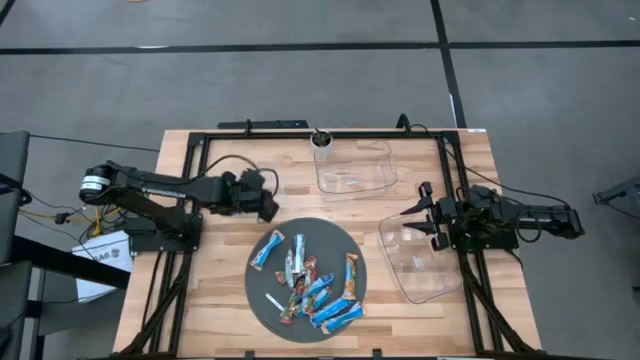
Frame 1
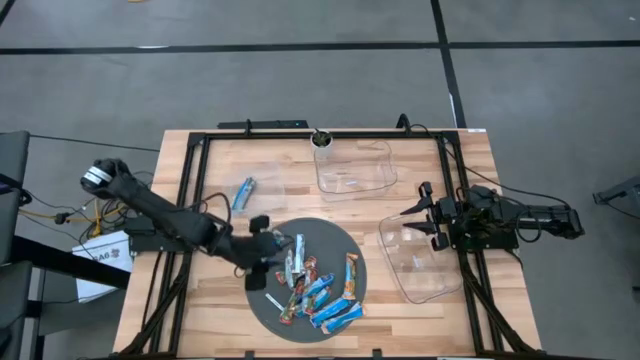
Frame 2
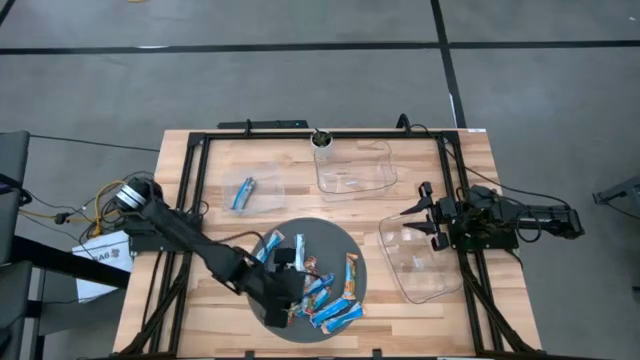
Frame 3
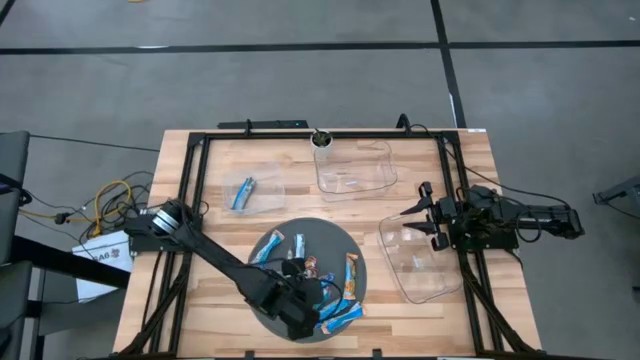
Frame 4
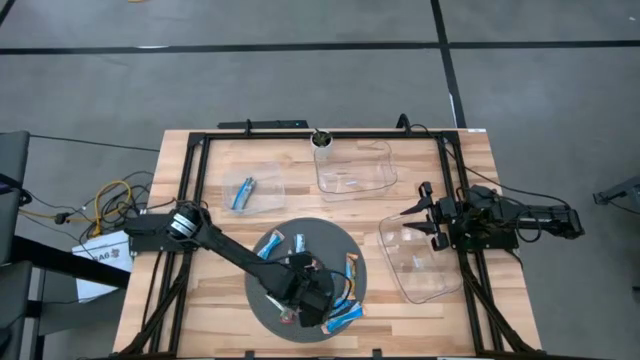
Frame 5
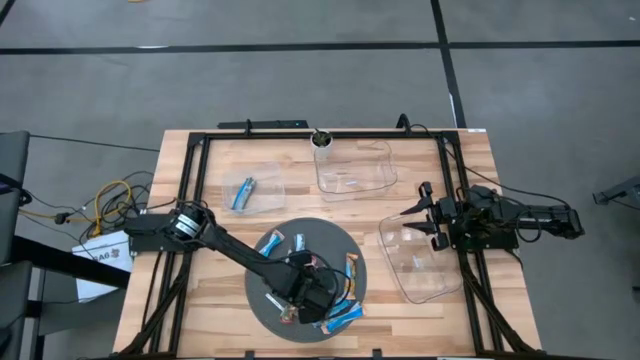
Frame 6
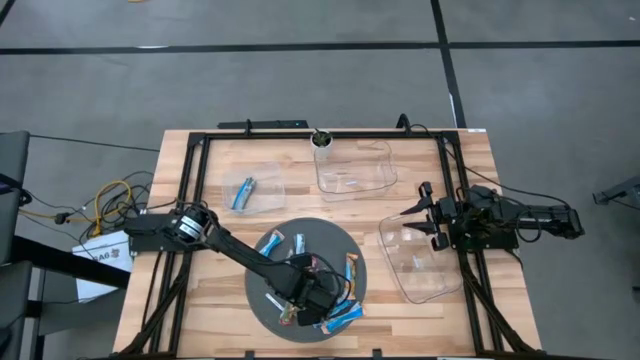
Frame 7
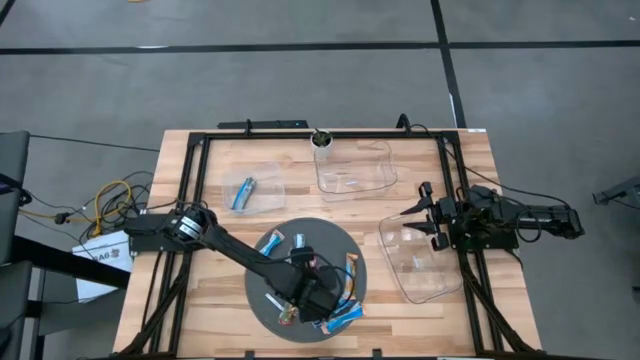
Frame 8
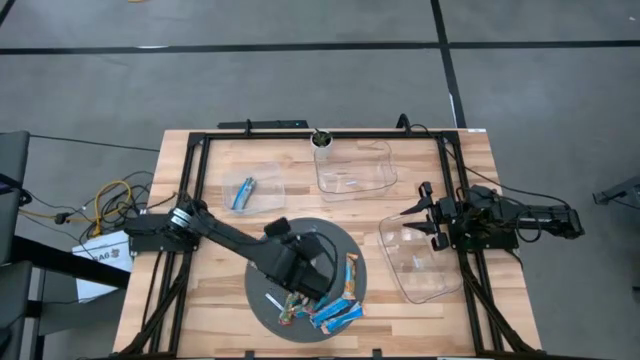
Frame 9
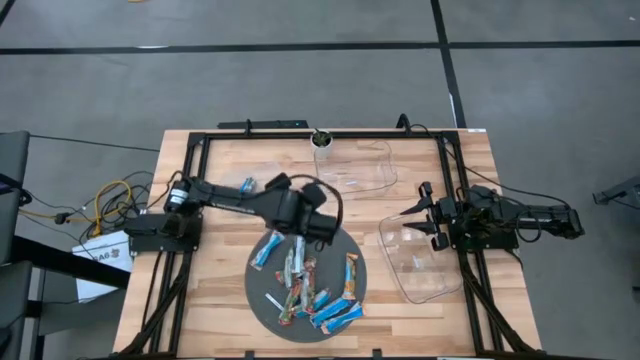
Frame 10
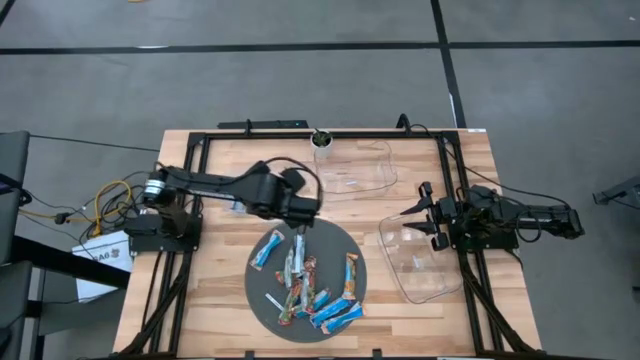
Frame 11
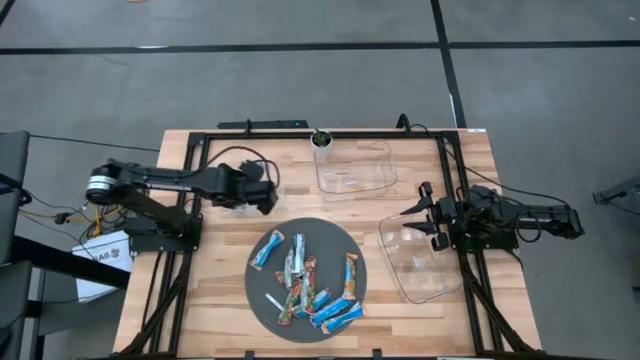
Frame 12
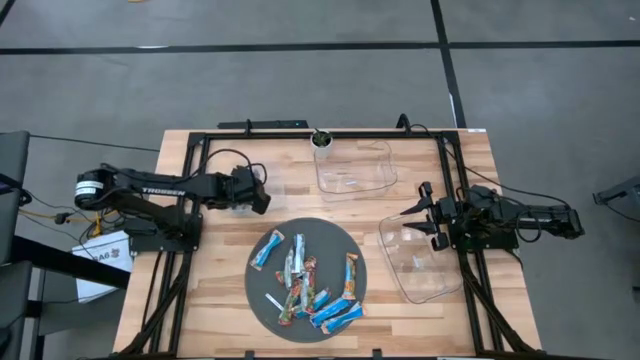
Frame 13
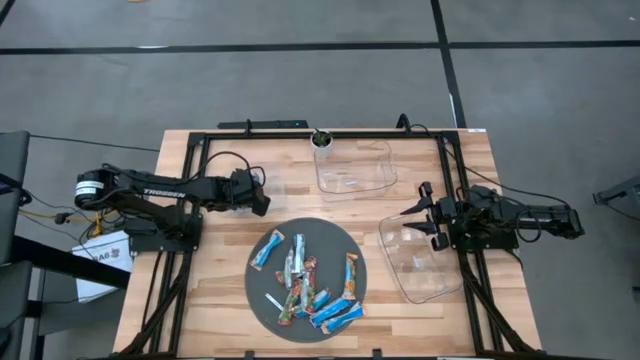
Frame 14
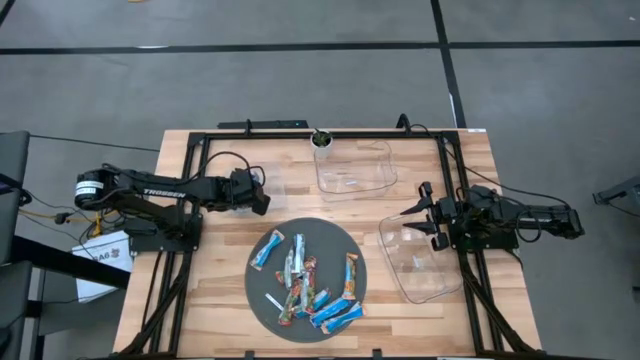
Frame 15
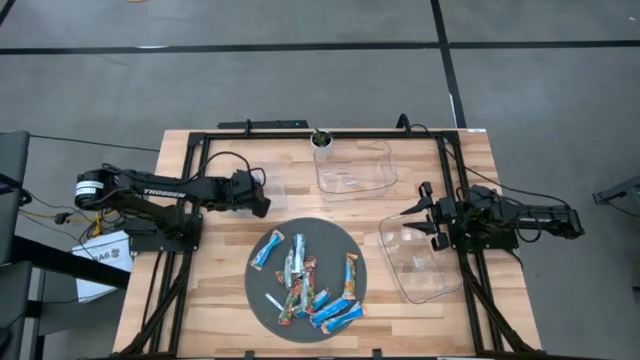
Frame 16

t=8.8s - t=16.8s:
Task: Pick and place Granola Bars by type
Put the blue granola bar into the white bin

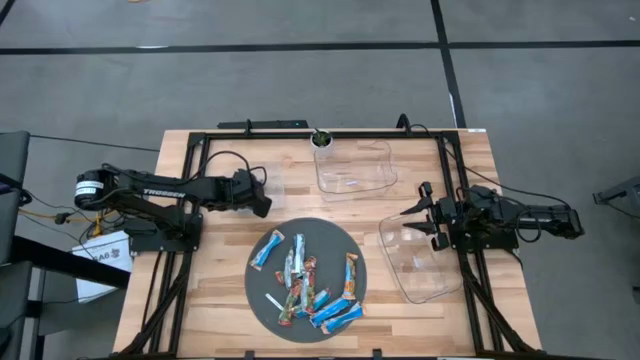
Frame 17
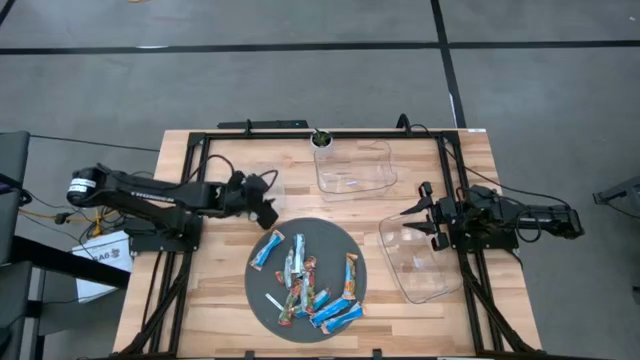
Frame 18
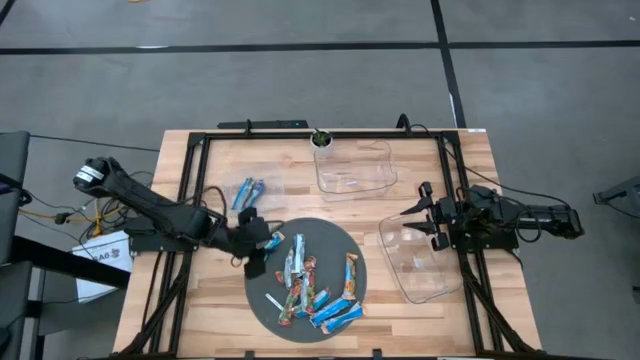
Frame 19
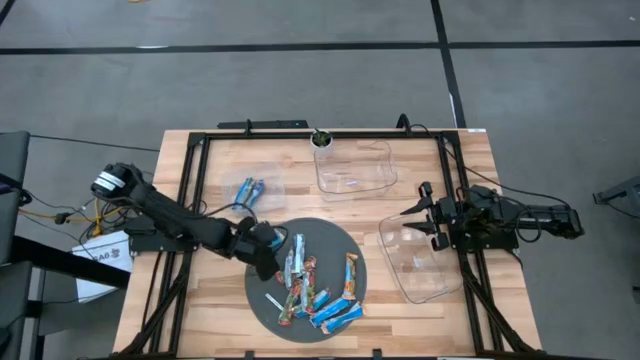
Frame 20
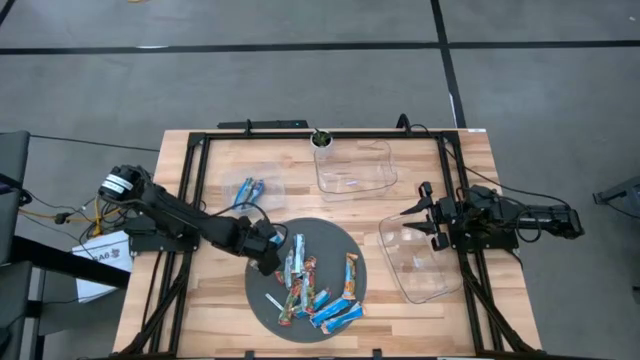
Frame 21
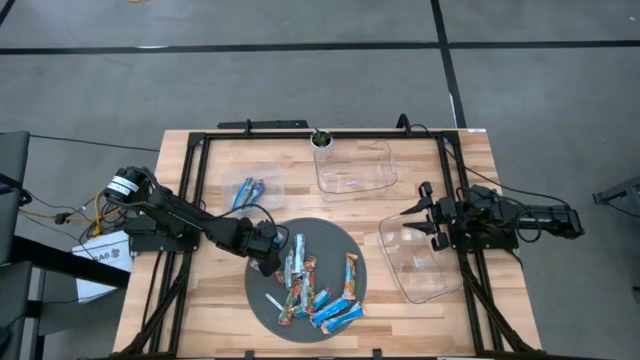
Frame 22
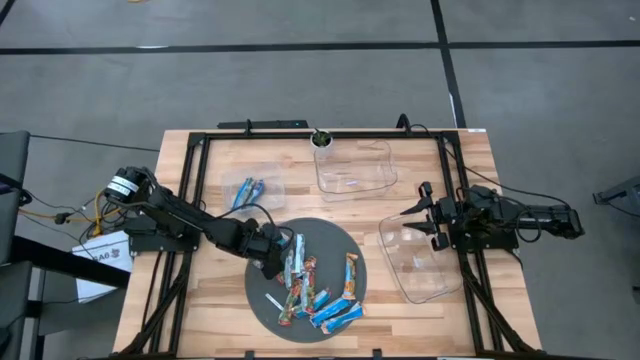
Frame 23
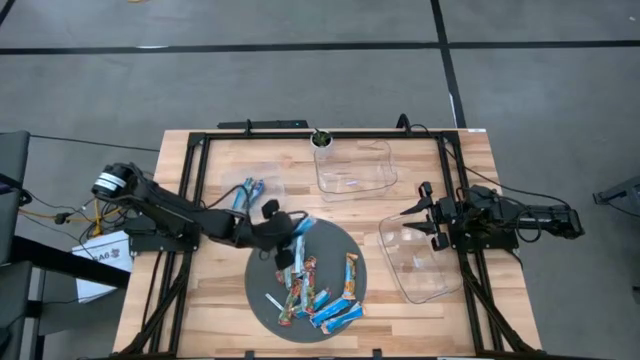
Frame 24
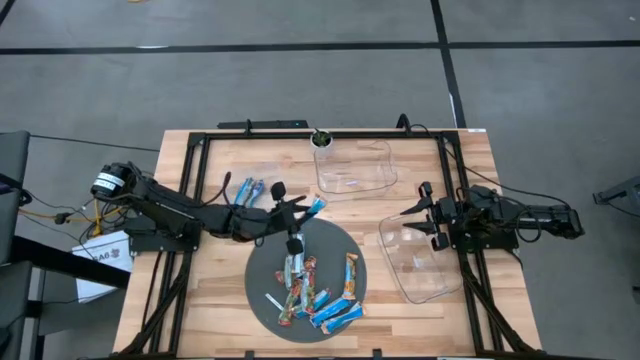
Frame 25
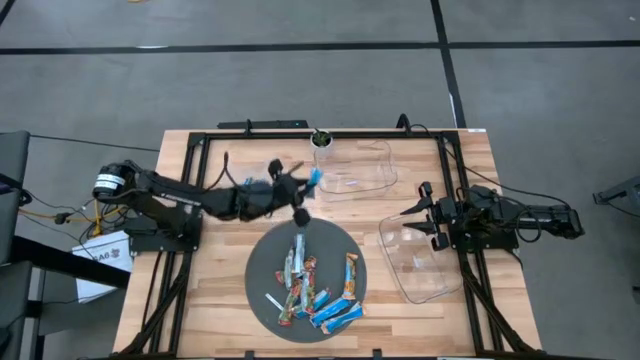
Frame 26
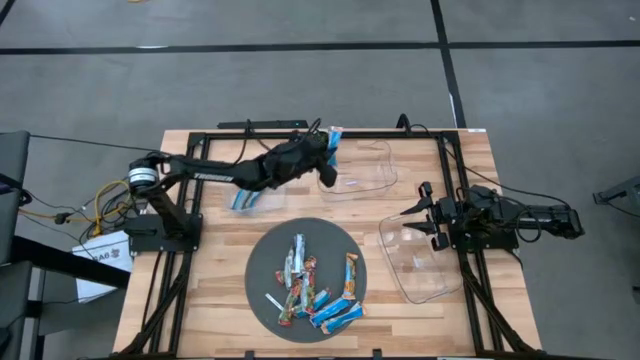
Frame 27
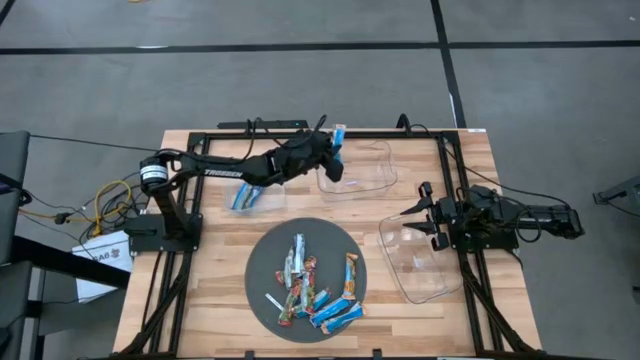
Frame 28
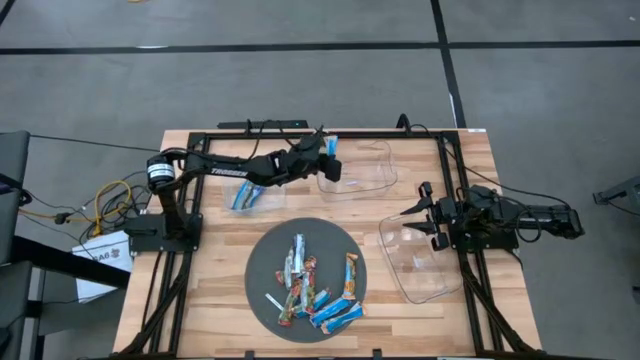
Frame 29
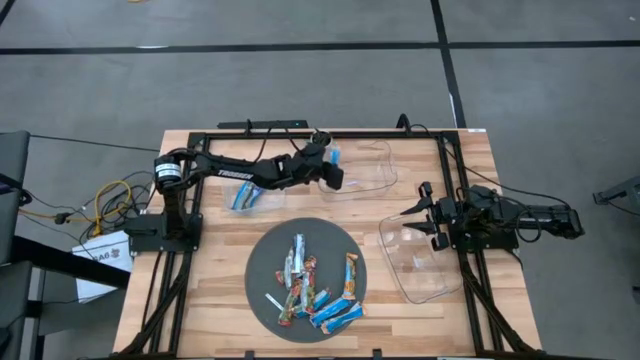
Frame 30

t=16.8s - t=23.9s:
Put the yellow granola bar into the top transparent bin

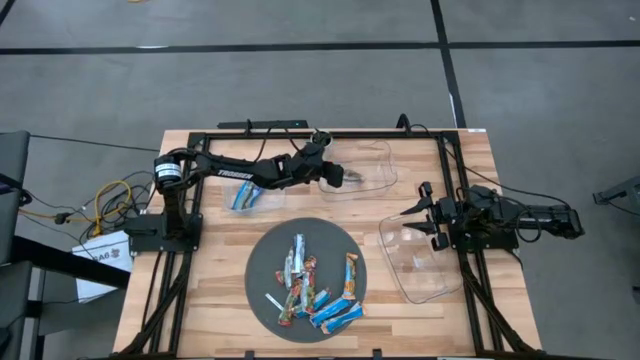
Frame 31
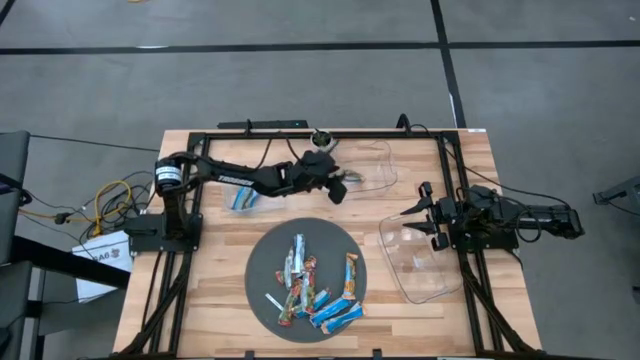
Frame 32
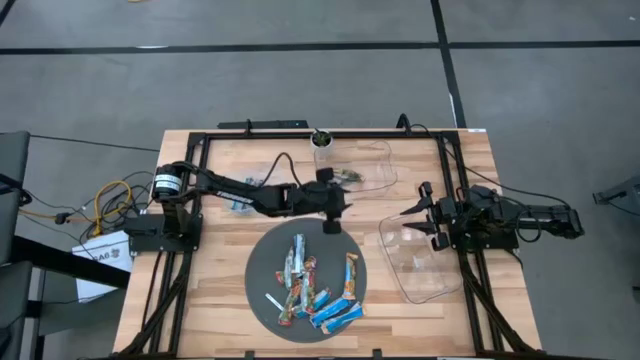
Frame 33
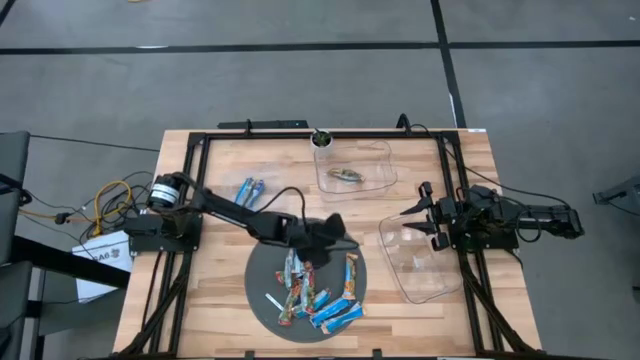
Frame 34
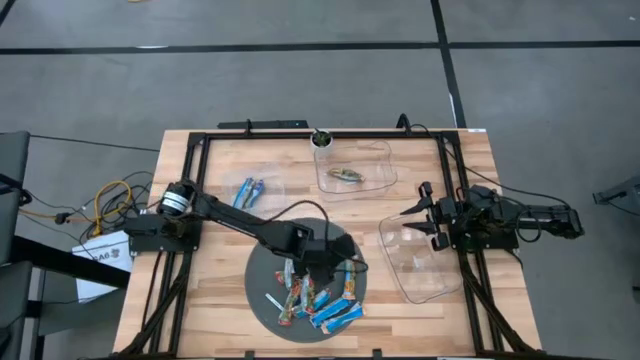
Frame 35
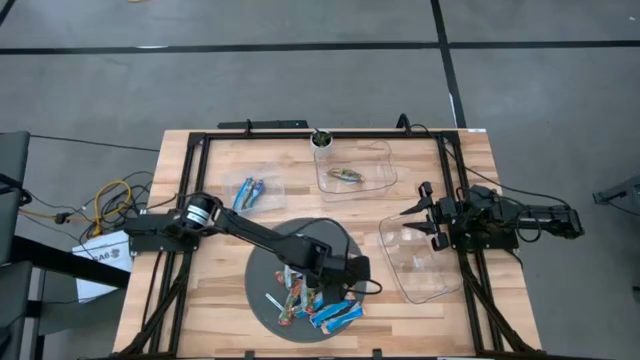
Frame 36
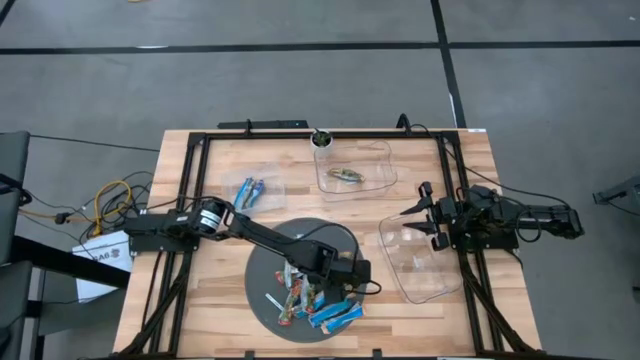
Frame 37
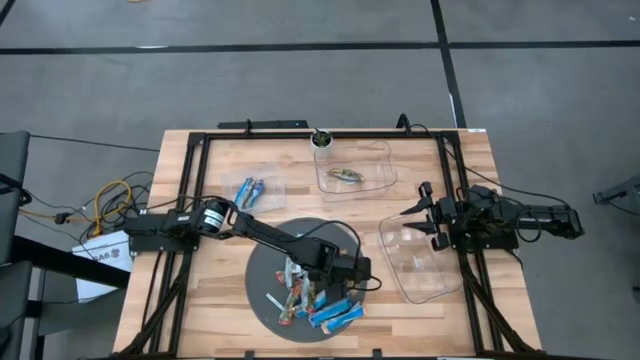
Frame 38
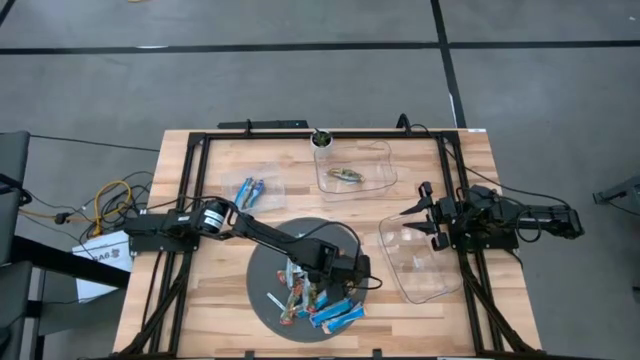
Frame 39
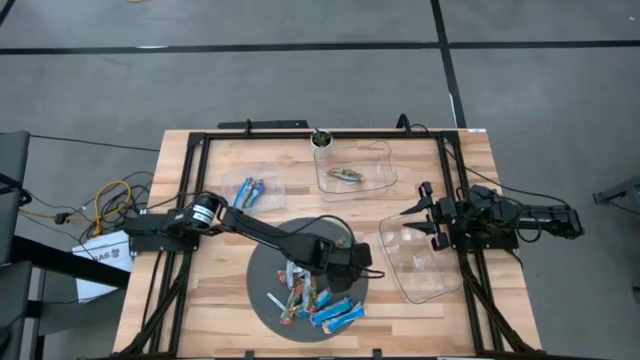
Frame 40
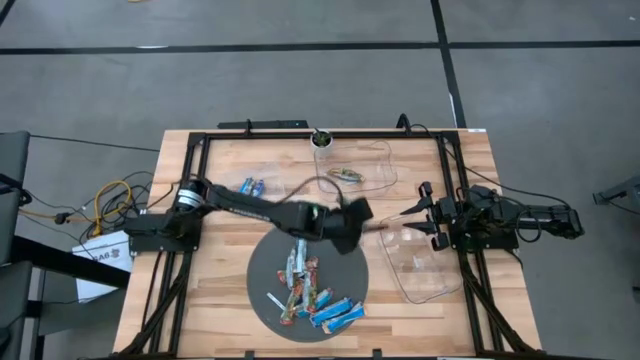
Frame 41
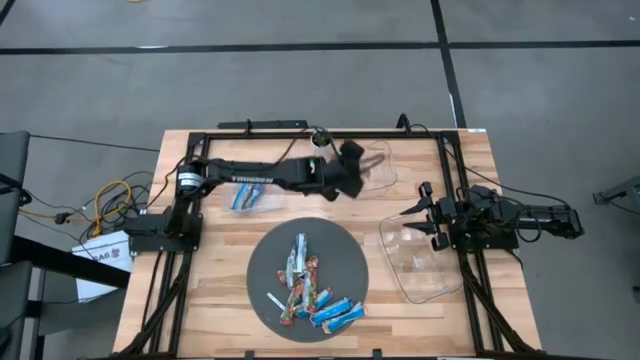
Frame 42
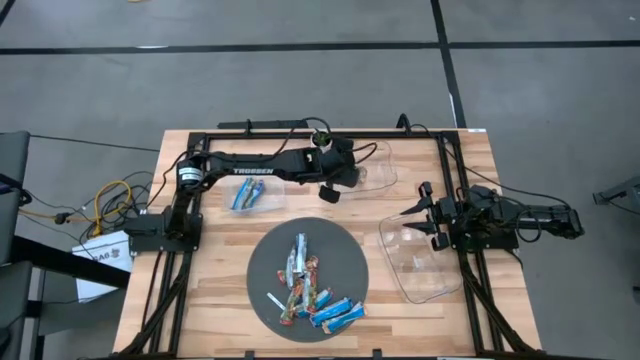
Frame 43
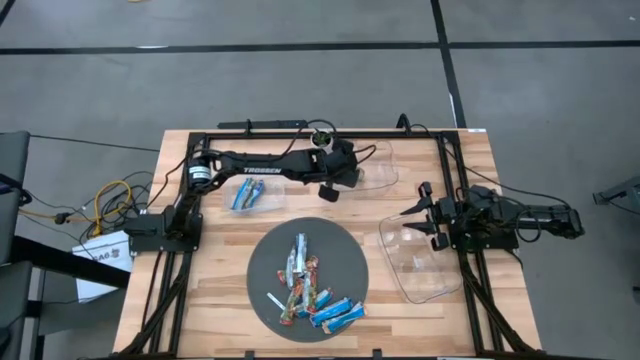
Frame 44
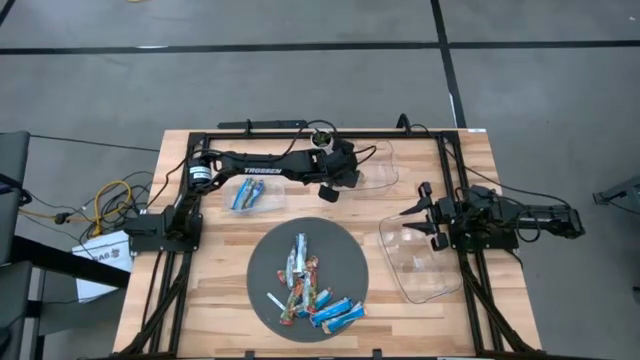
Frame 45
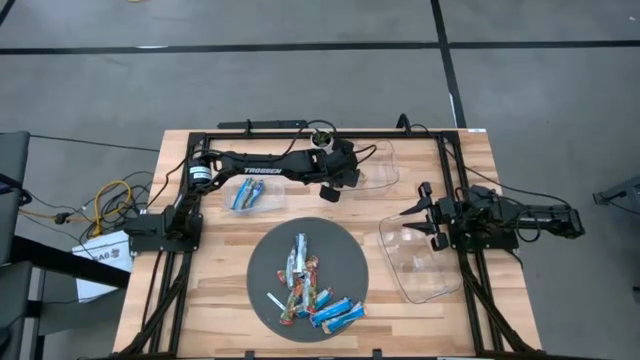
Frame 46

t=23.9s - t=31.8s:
Put the yellow granola bar into the top transparent bin
